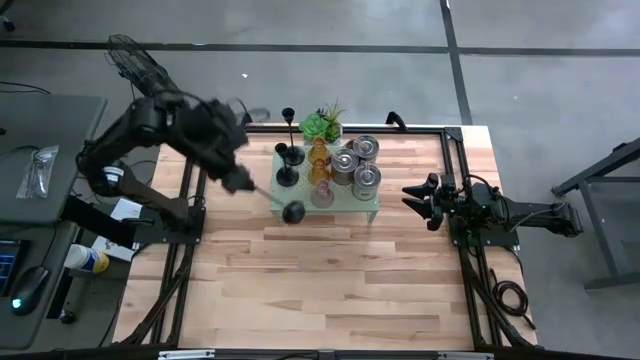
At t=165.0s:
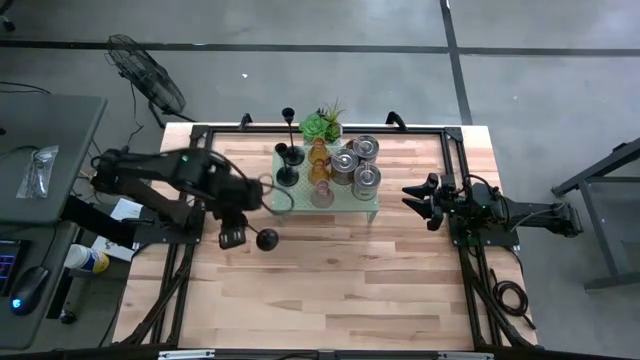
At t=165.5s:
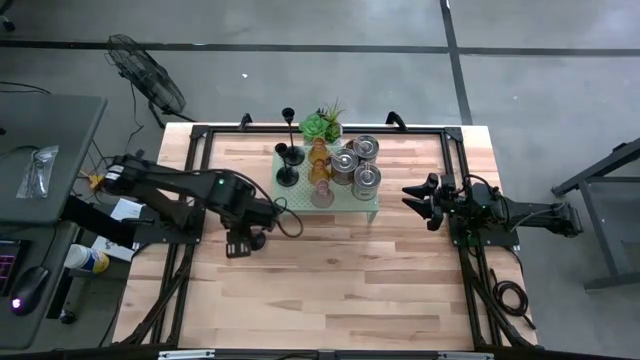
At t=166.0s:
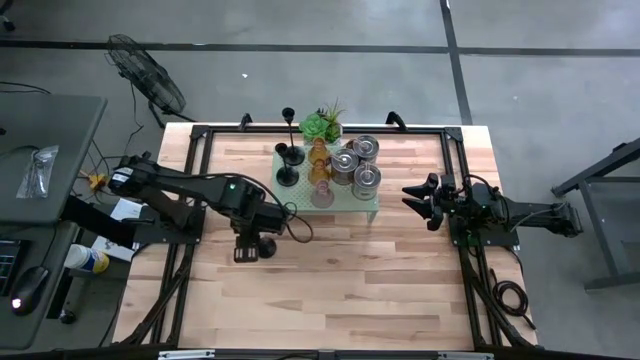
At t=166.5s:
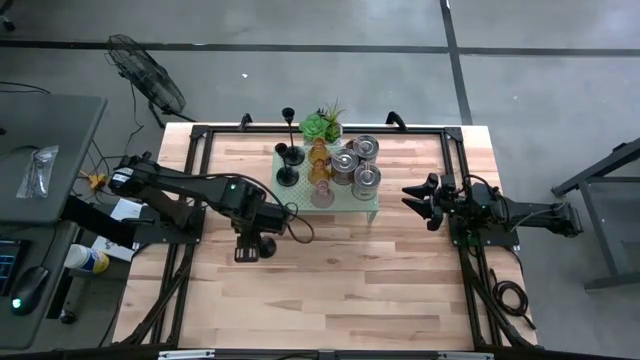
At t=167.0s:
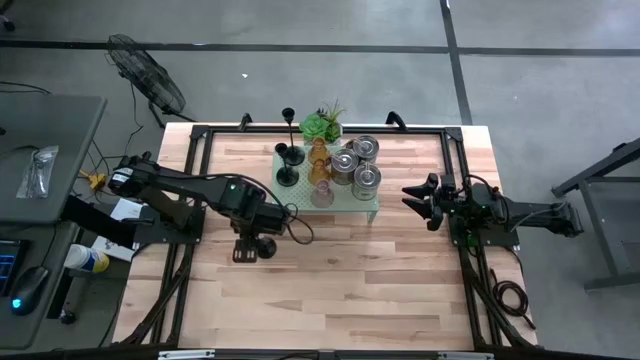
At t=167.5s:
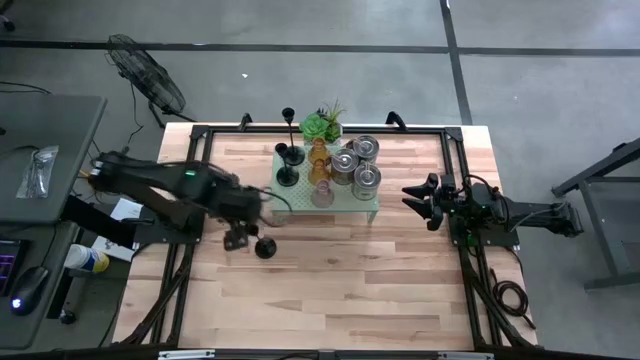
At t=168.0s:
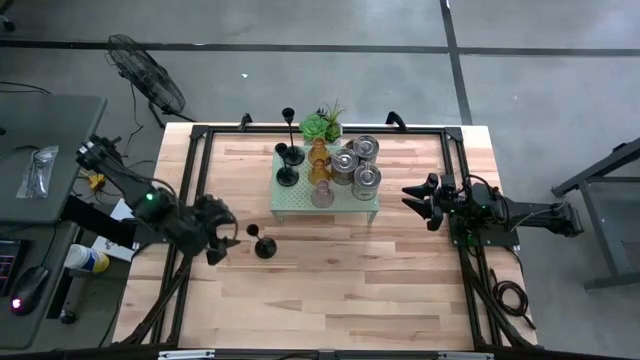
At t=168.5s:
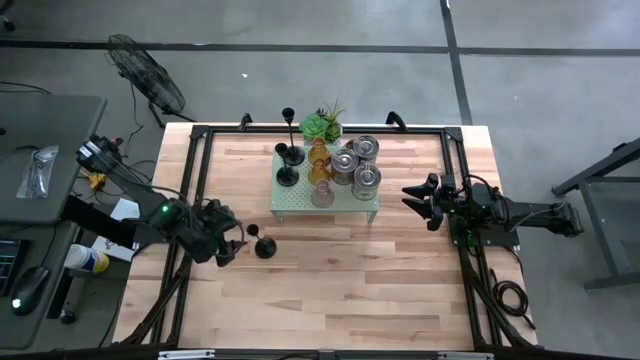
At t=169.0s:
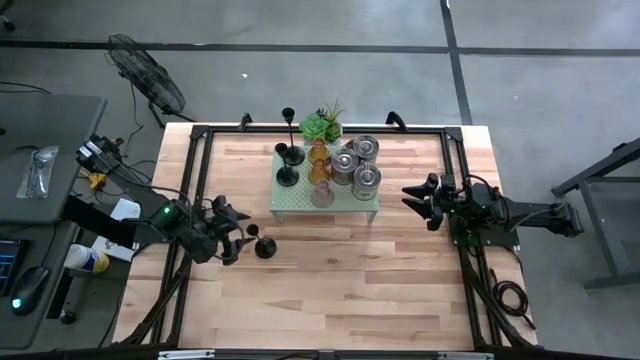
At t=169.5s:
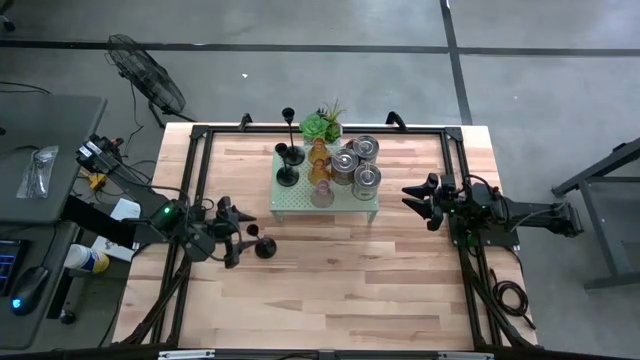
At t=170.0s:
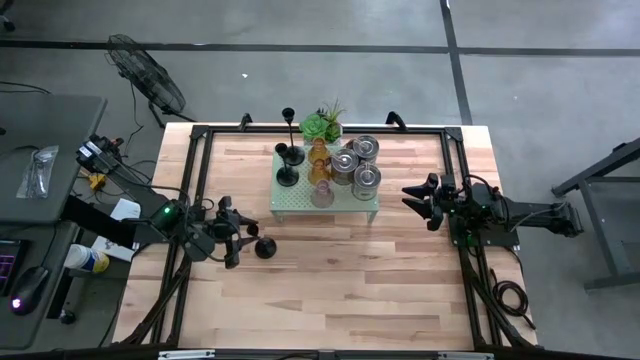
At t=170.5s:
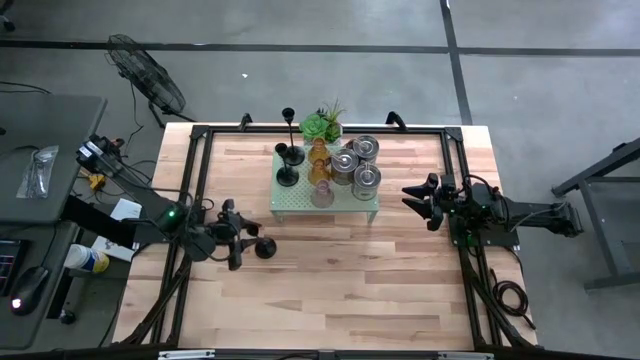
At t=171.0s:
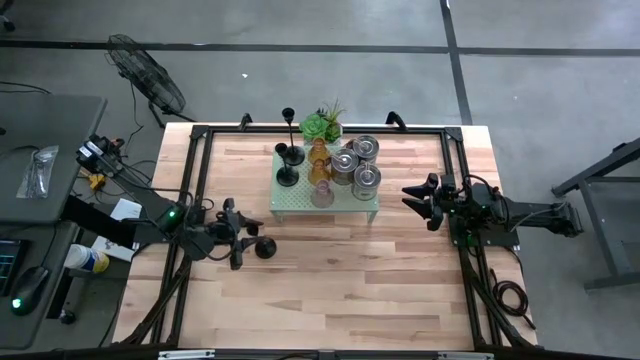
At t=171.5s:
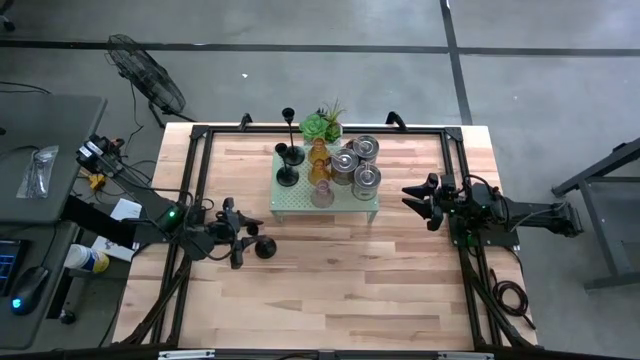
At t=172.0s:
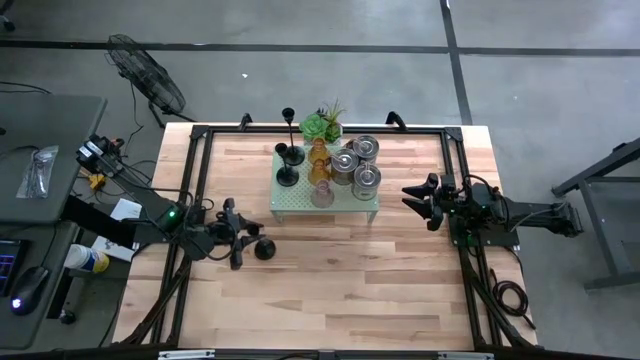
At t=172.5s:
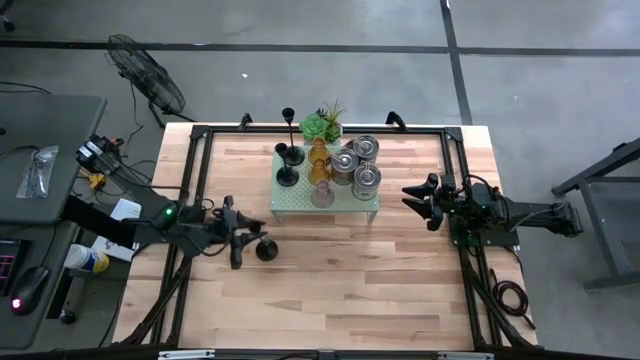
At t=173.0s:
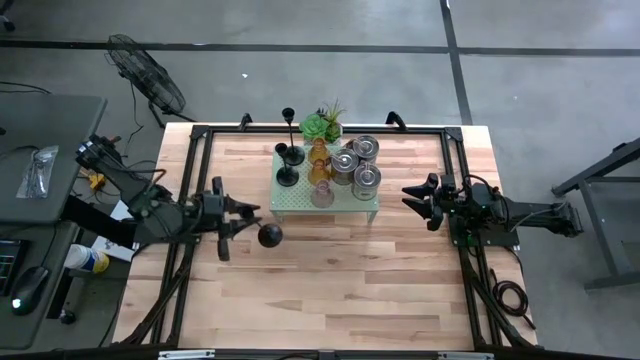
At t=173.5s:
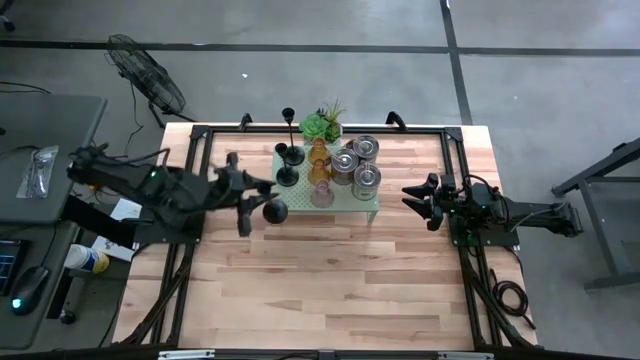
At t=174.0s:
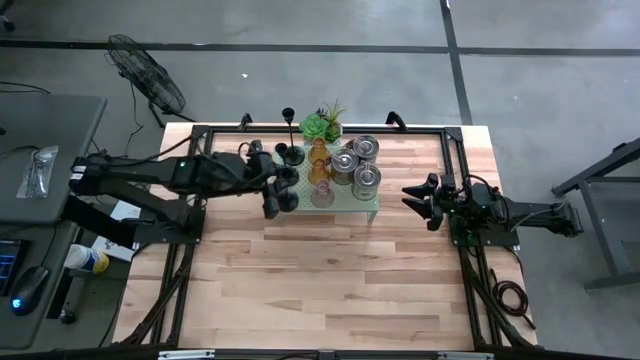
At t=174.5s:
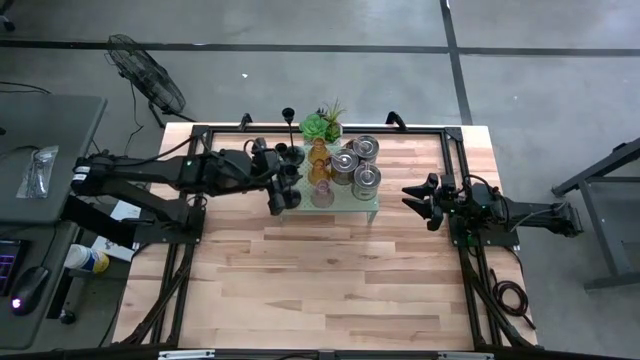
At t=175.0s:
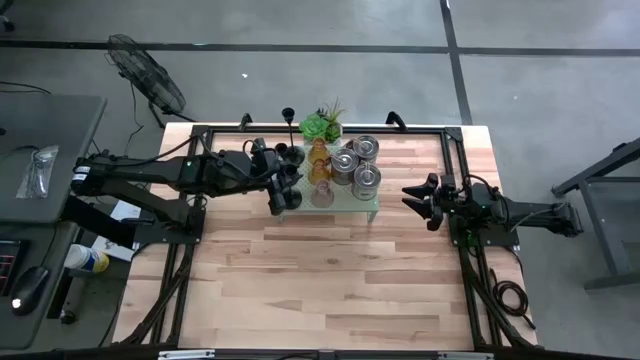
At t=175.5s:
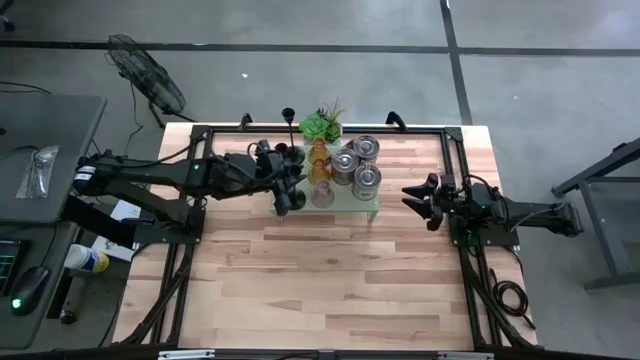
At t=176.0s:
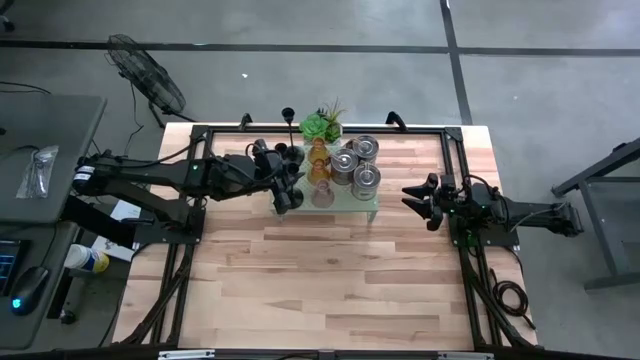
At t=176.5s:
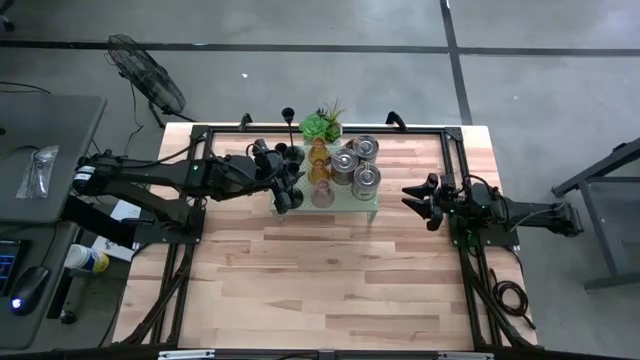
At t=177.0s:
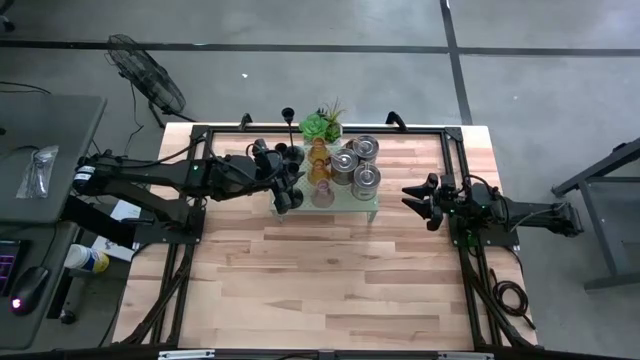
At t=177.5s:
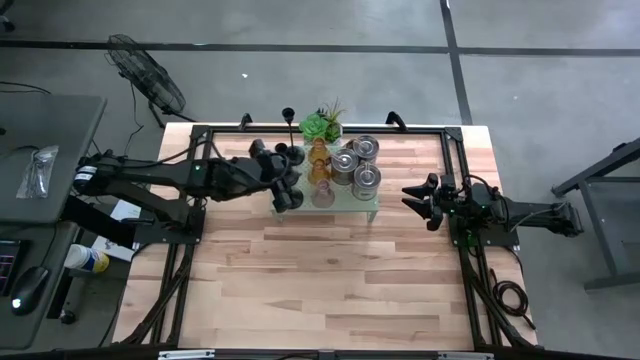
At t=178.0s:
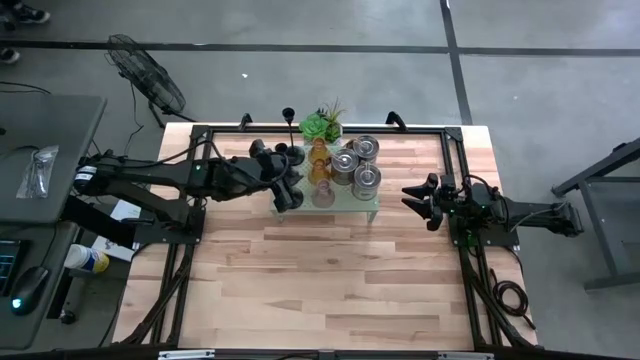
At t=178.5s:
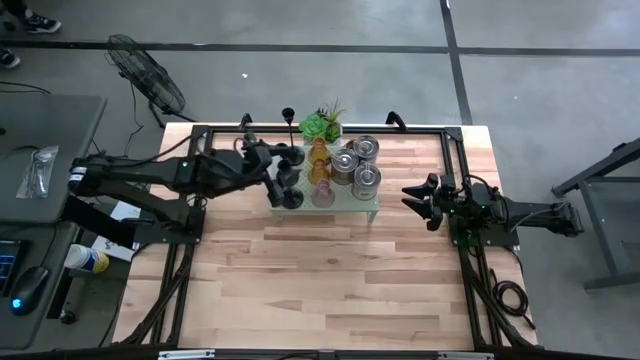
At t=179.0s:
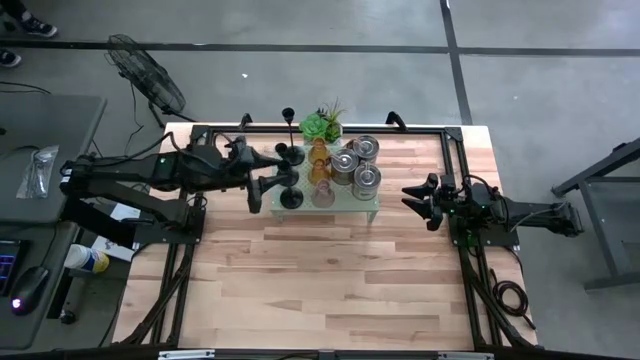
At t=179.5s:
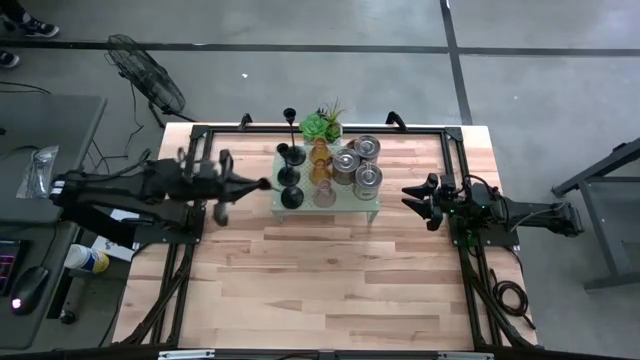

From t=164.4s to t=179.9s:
Task: Pick & Place candle stick holders
Put the black candle holder on the shelf

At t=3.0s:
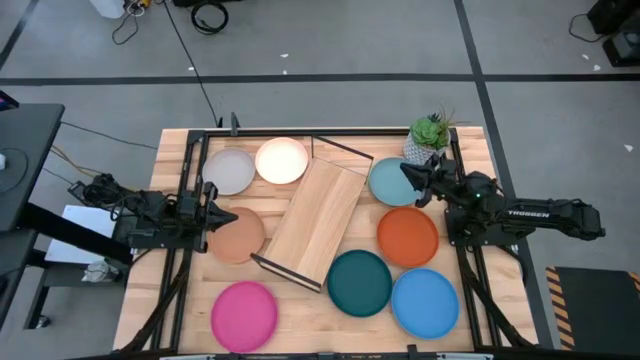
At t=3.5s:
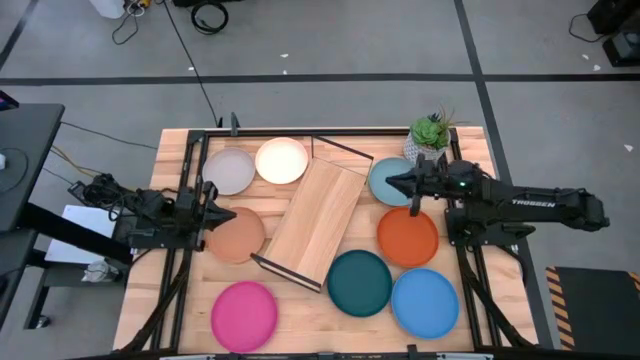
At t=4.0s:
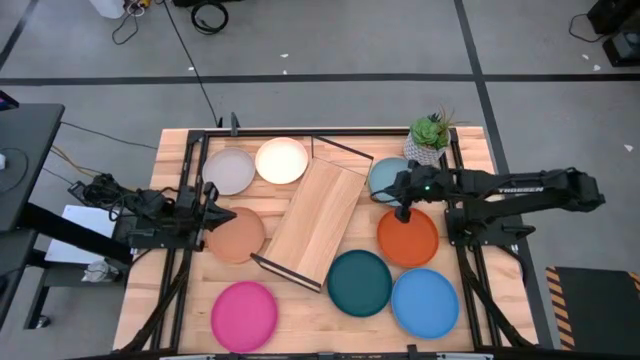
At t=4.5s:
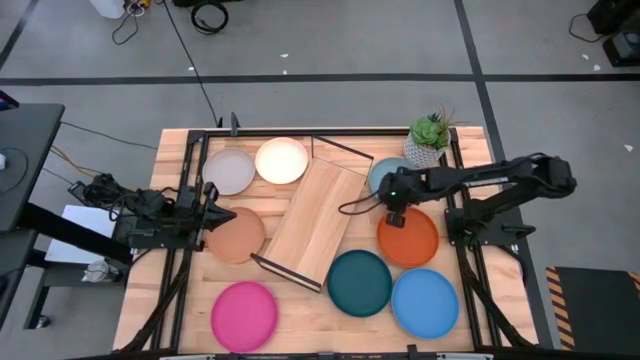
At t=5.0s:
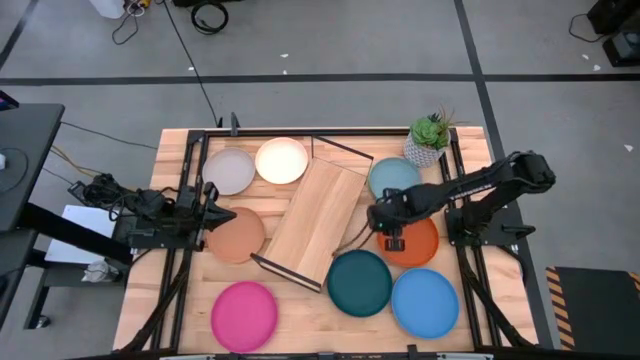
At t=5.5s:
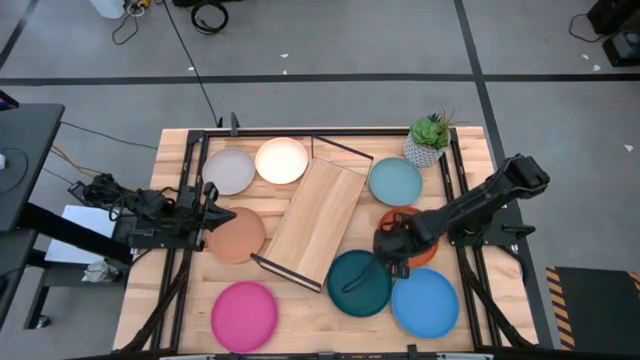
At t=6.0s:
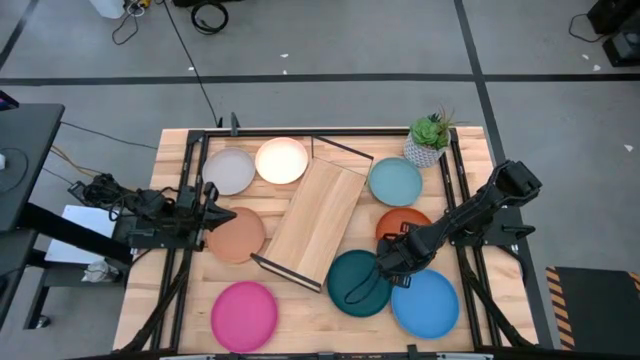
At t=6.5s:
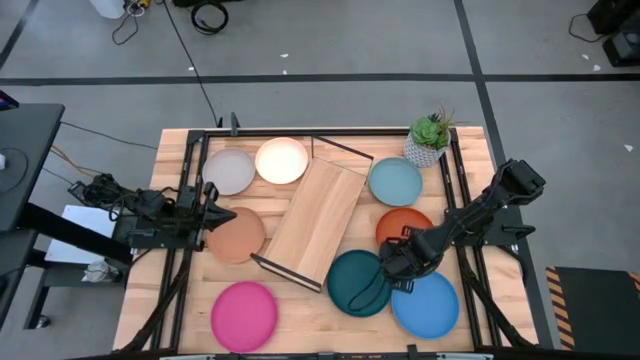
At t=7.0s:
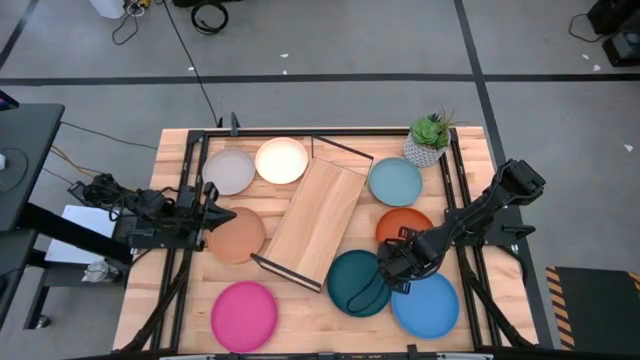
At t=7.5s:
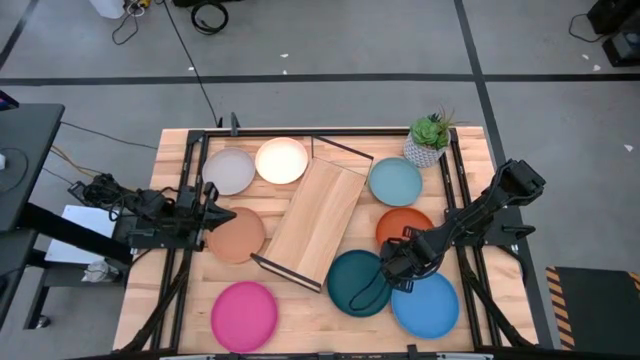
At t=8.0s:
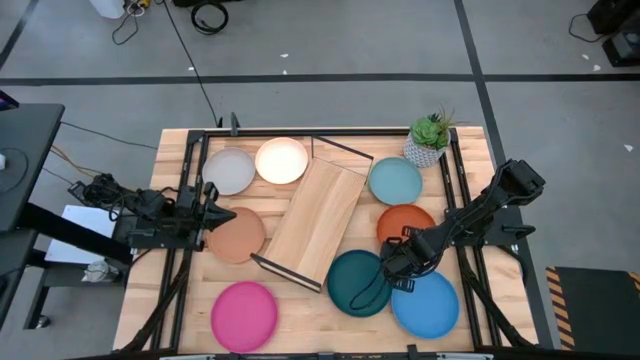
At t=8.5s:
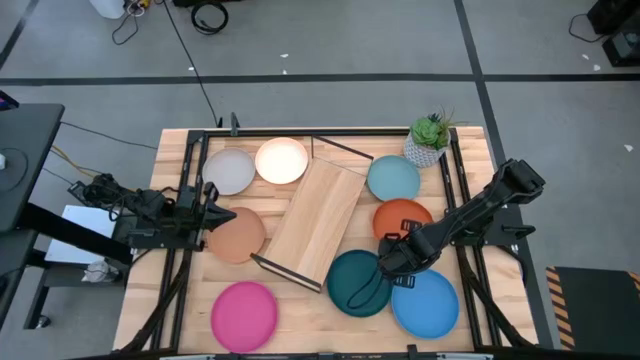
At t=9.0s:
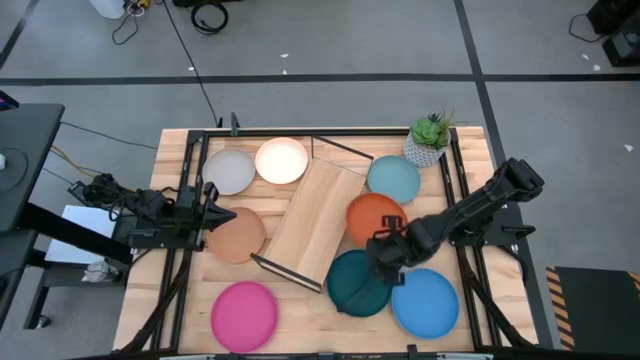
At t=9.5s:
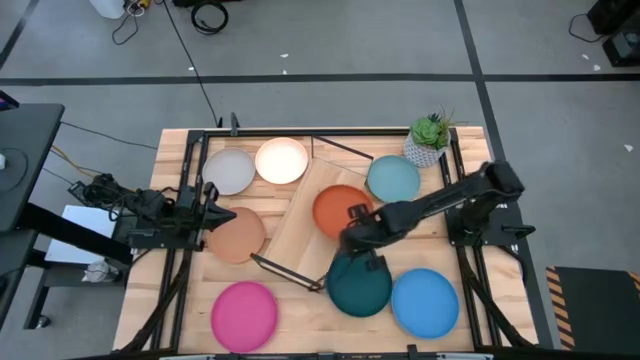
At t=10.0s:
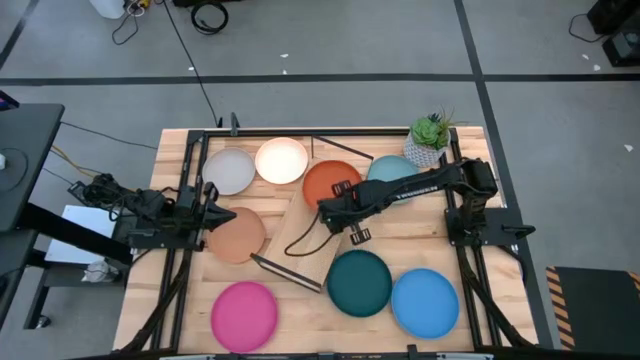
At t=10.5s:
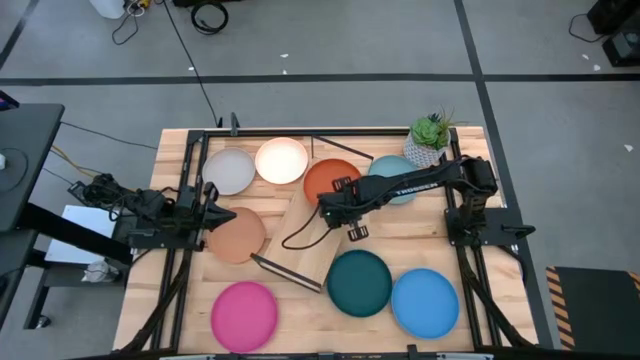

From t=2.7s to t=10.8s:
Task: Place and stack plates onto a shelf
Put the orange plate on the shelf
